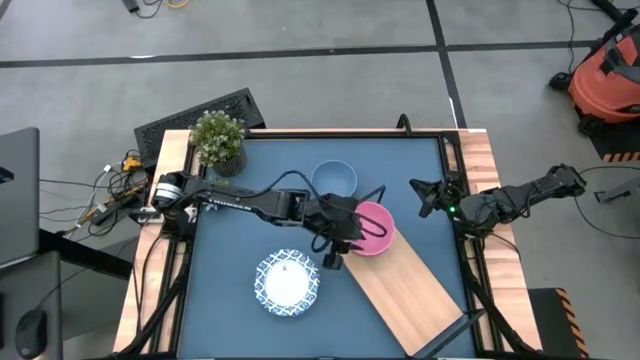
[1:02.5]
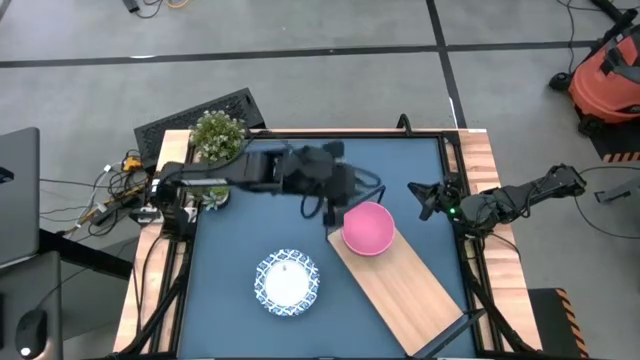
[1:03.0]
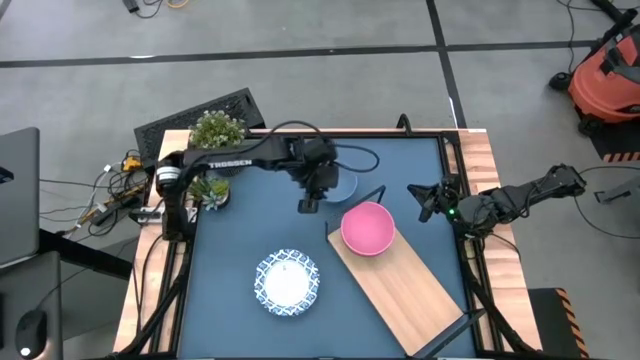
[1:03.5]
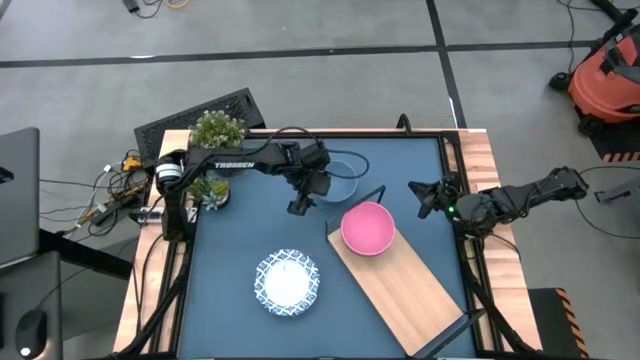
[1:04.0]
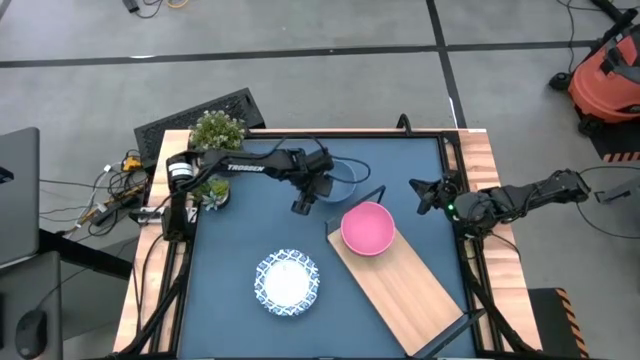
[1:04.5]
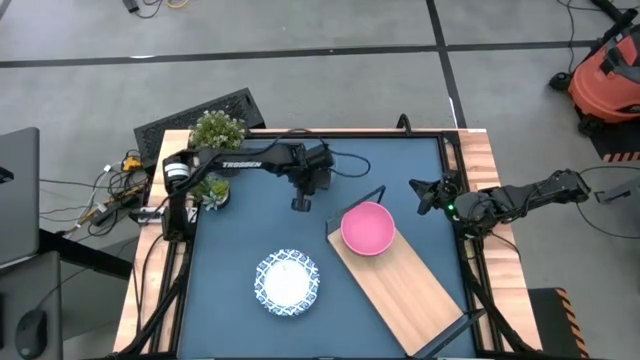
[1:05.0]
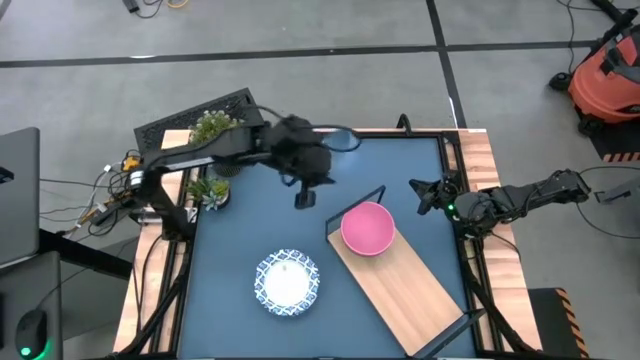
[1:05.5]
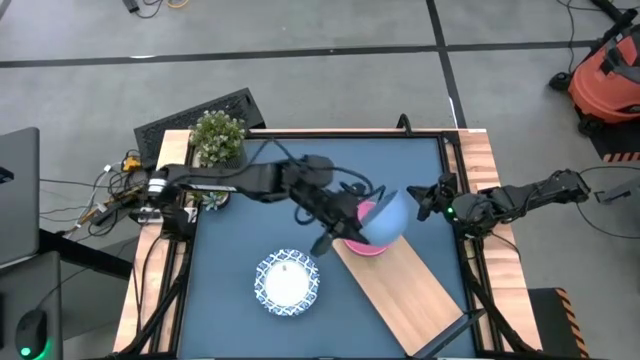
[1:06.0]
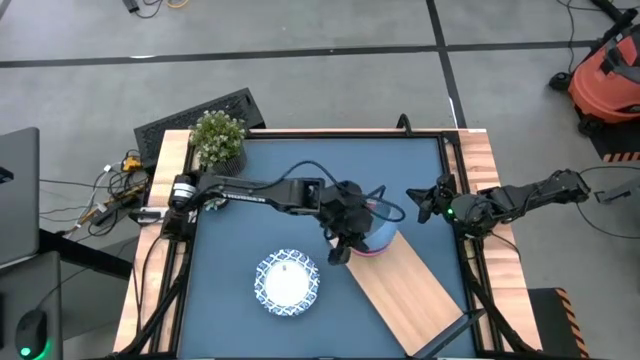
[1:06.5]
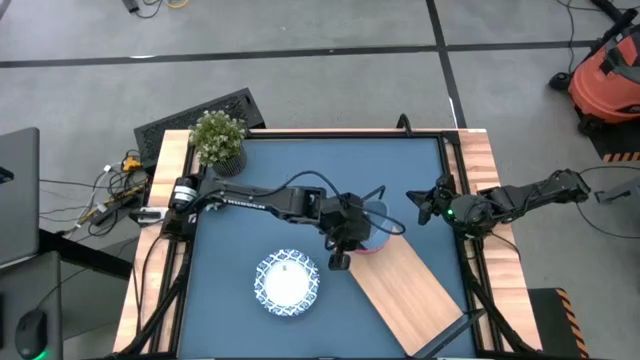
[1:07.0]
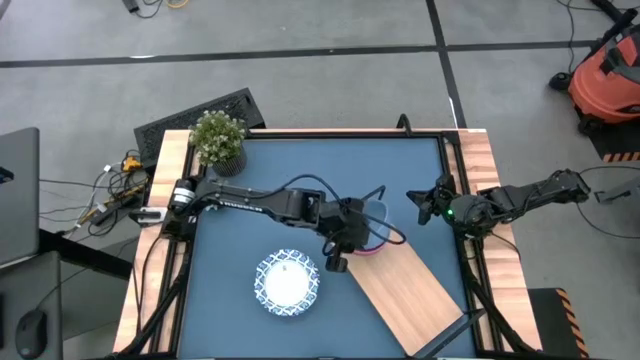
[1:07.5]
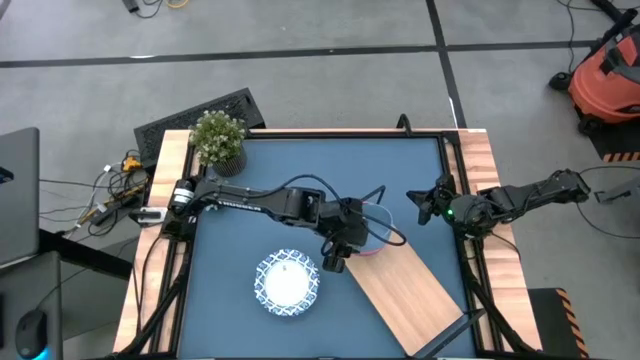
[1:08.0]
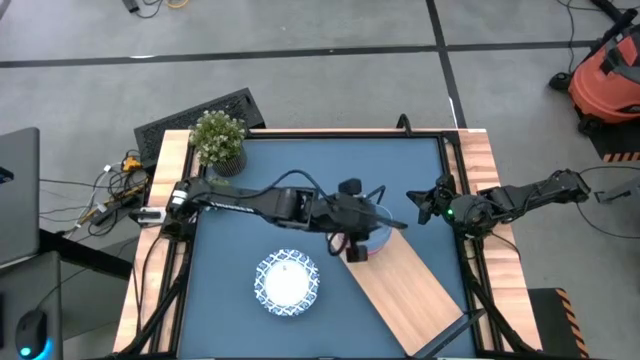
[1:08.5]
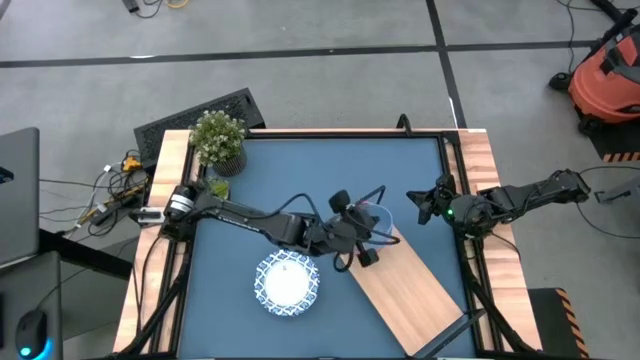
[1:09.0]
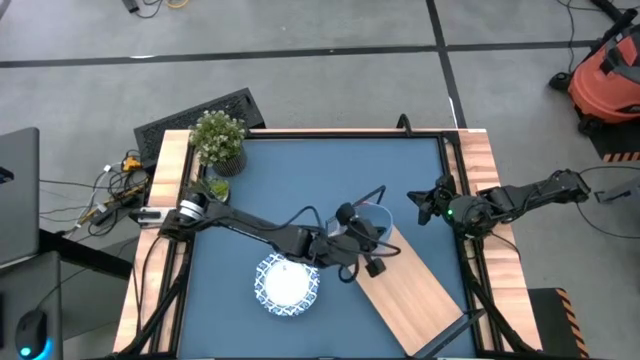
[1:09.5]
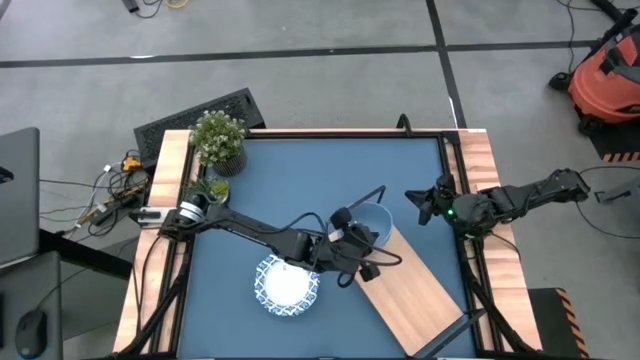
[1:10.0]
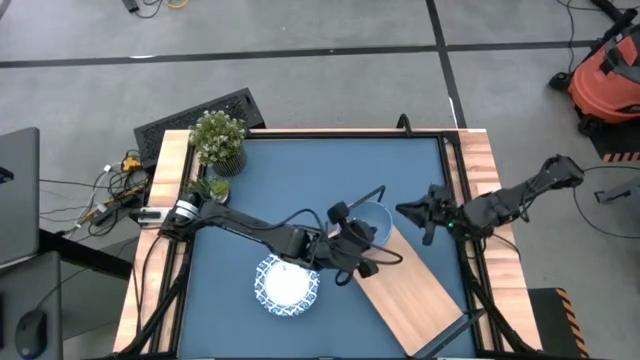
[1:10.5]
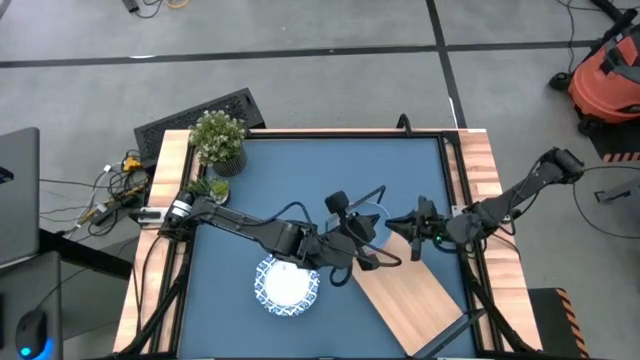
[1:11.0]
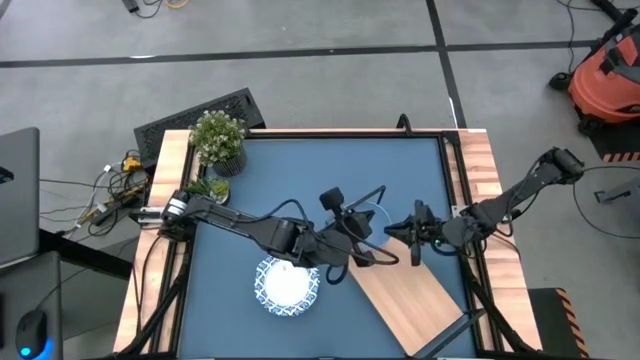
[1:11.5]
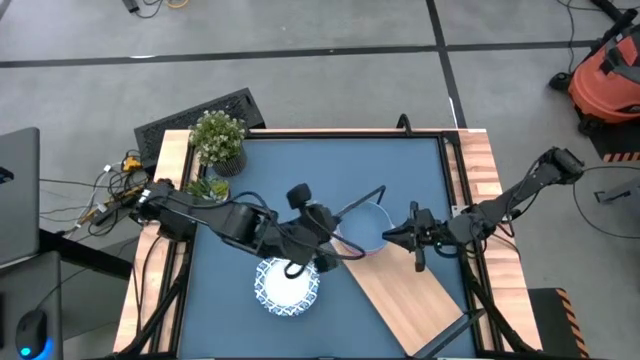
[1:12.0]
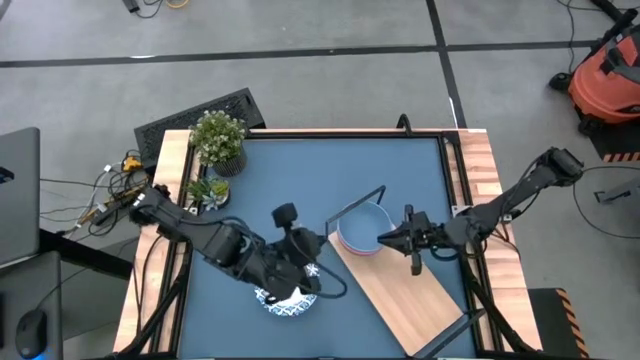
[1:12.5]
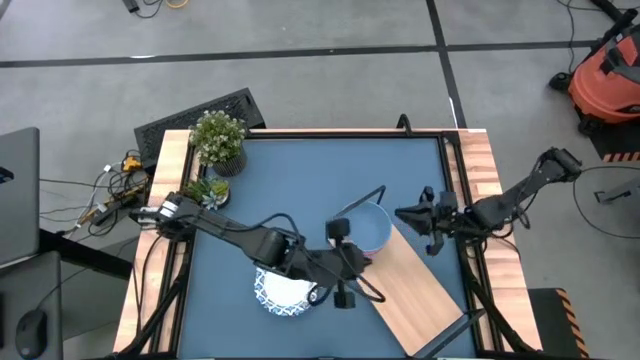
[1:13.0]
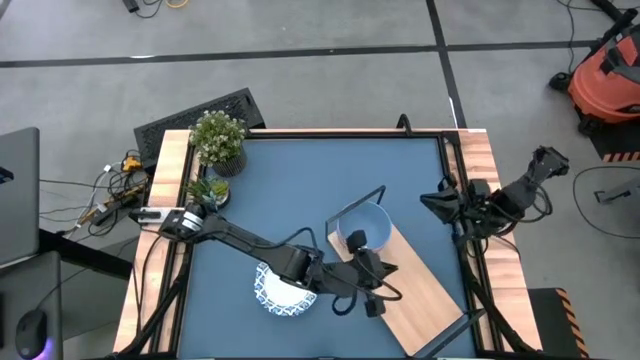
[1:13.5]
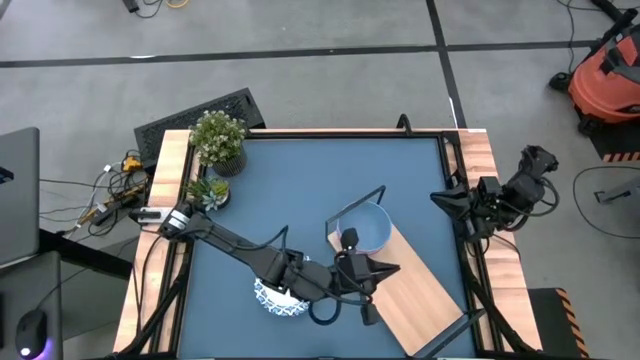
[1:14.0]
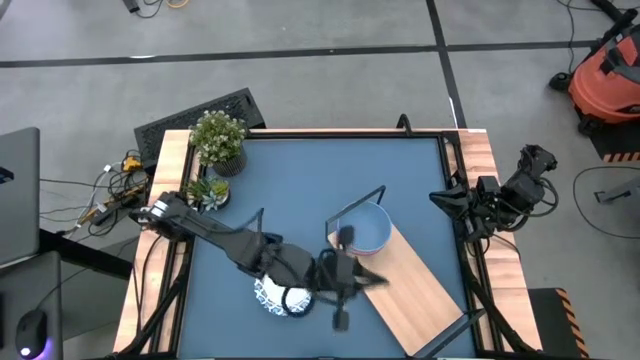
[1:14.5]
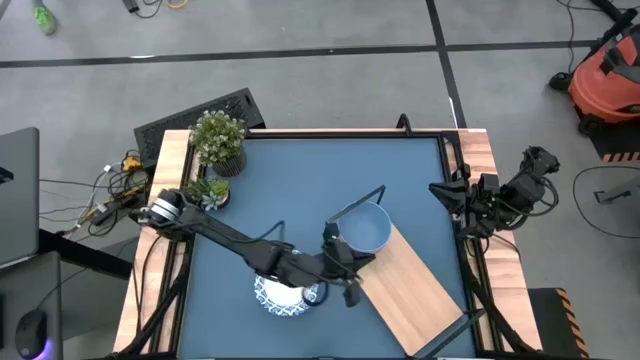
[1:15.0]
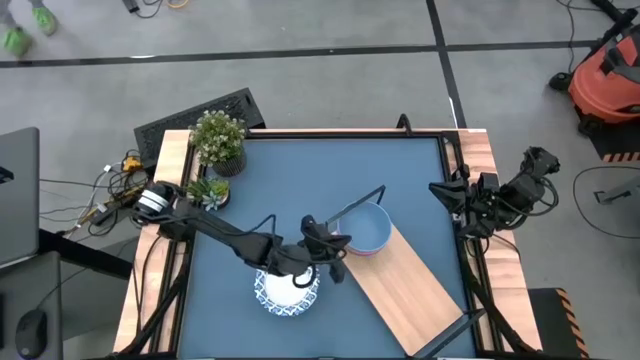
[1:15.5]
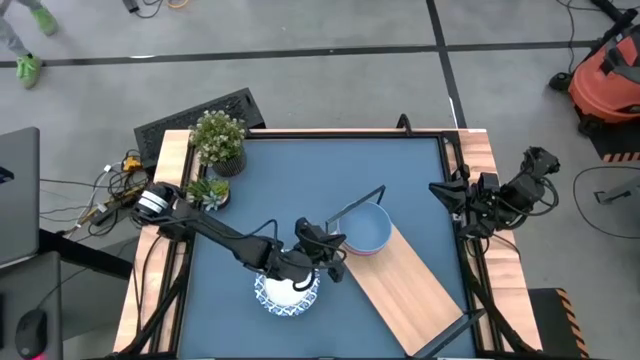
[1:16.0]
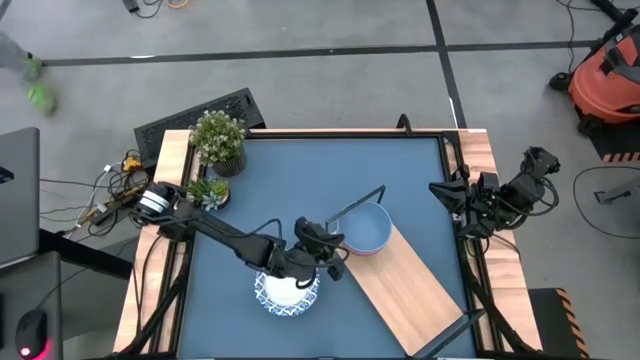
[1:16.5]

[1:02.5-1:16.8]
Task: Place and stack bowls onto a shelf
Stack the blue bowl on top of the pink bowl on the shelf

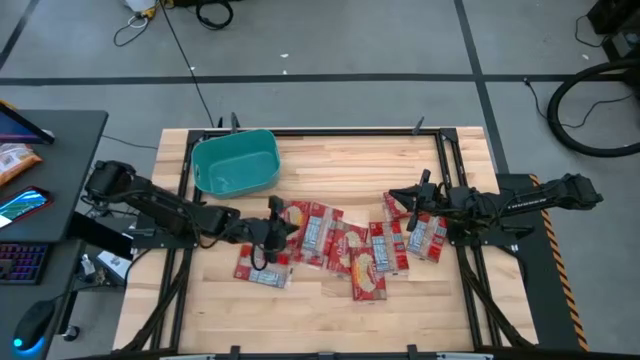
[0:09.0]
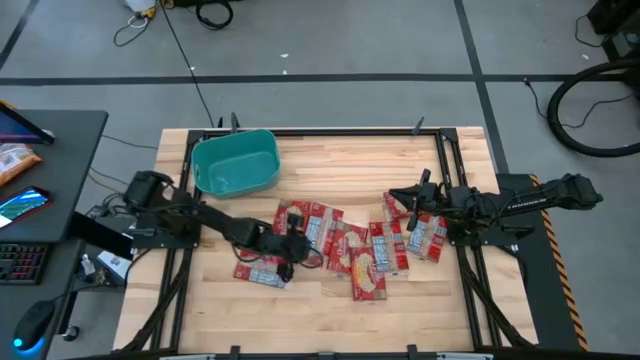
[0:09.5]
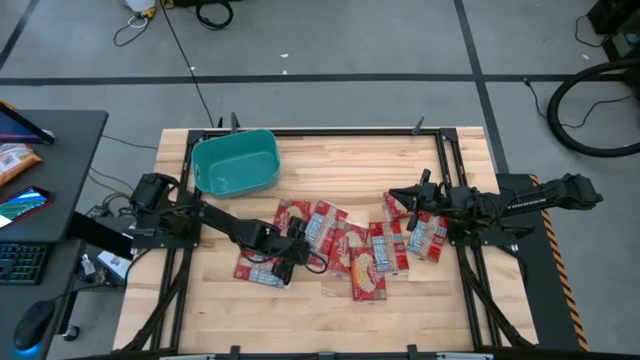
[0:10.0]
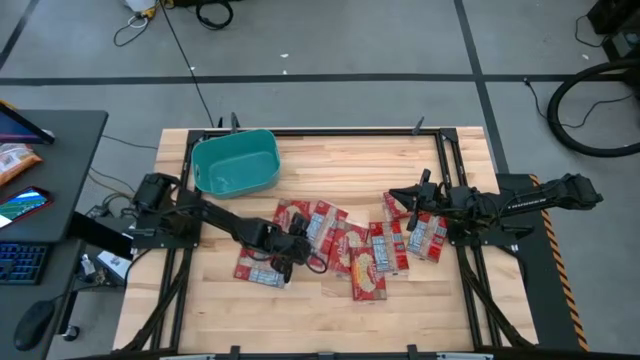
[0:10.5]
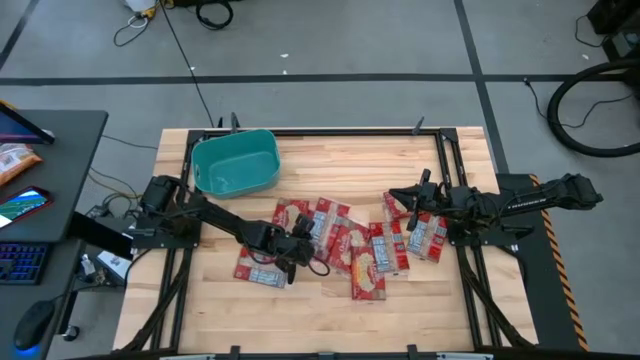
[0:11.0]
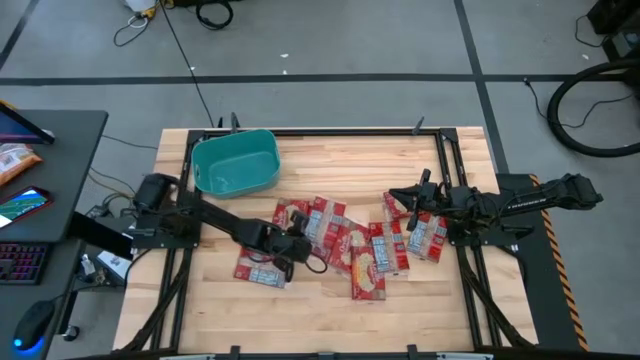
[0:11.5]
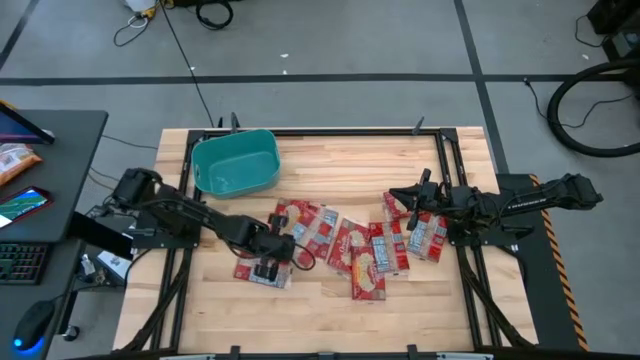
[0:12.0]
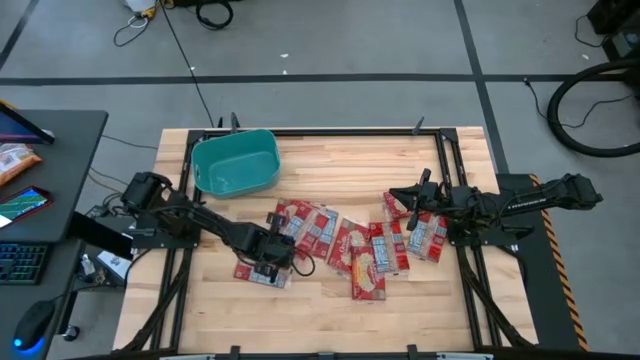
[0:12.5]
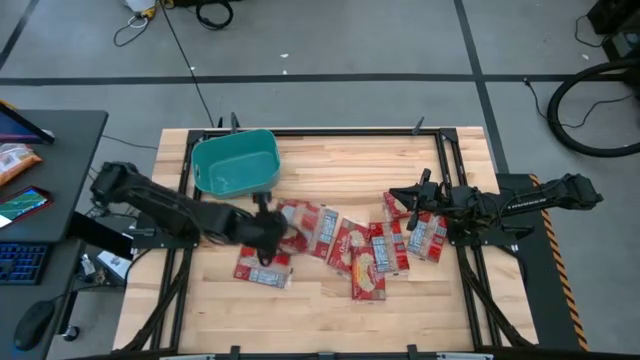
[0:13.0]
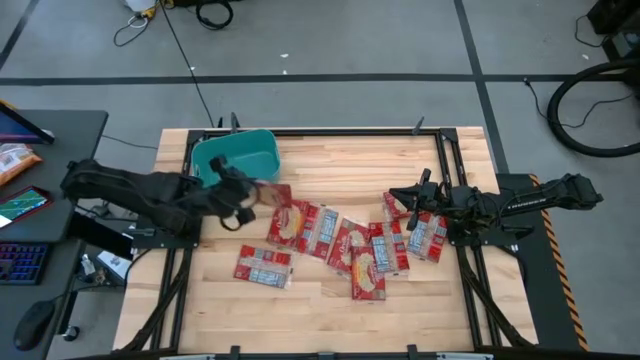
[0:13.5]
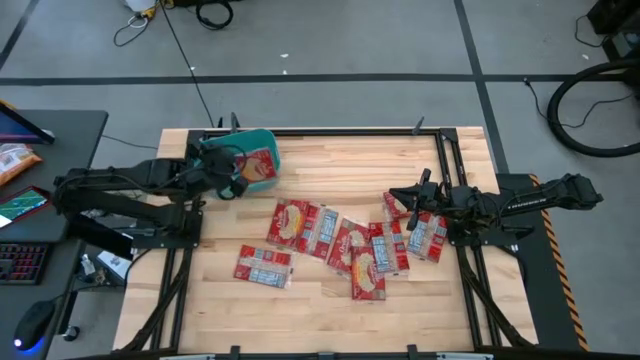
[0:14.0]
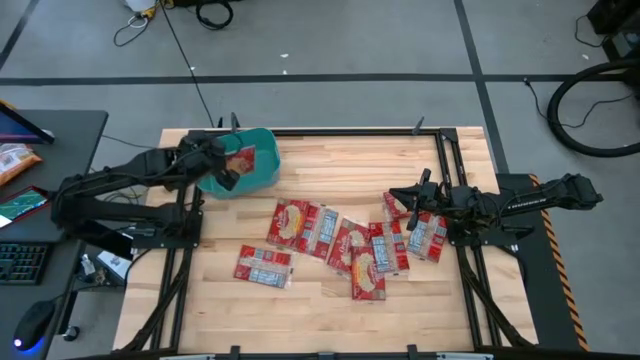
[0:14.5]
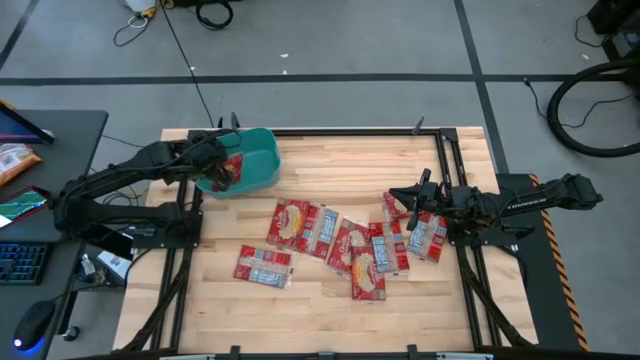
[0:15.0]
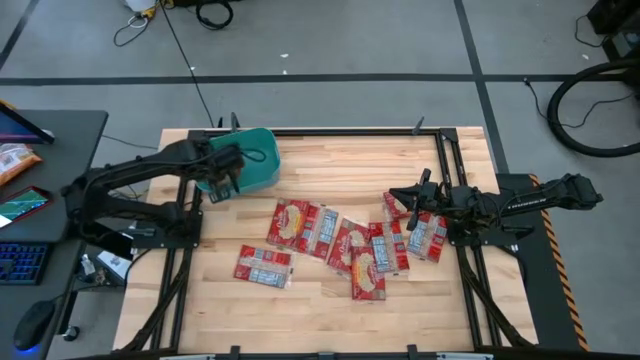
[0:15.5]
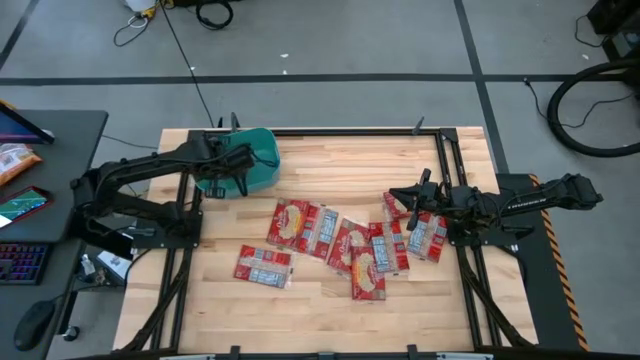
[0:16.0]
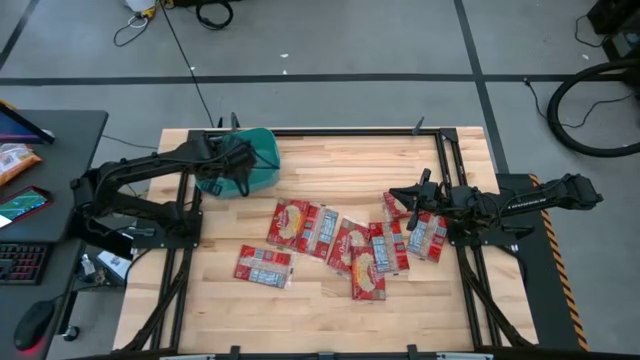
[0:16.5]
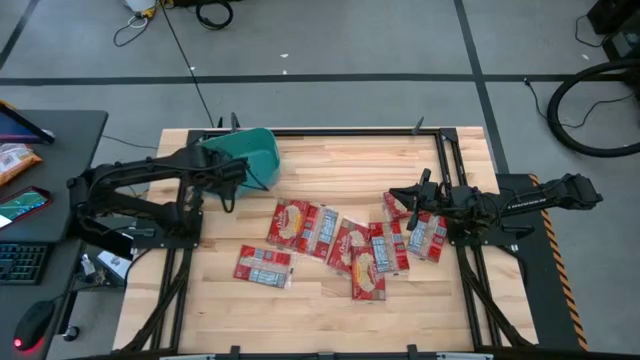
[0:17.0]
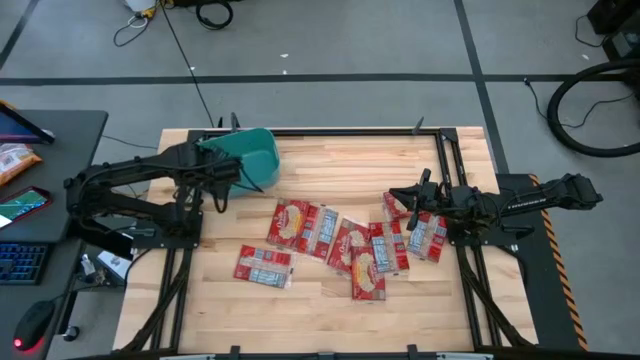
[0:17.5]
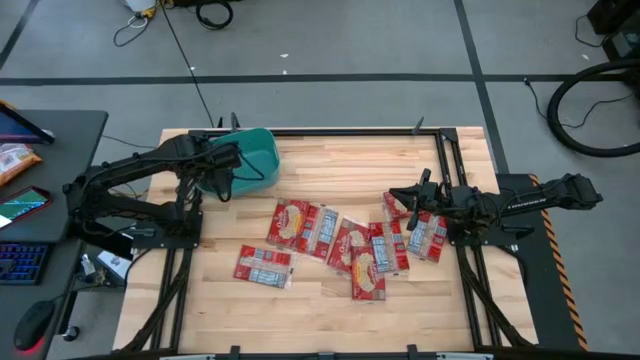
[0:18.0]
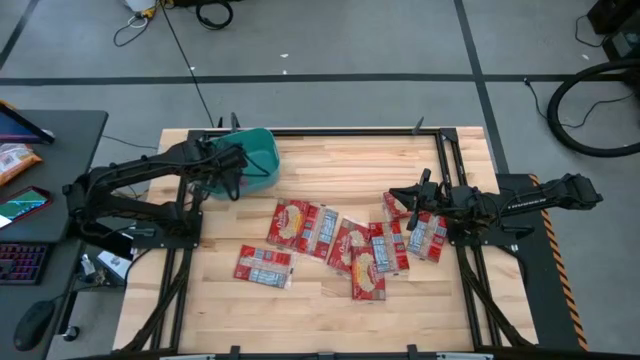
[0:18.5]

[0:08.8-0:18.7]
Task: Sort popcorn bags into baskets
Put the red popcorn bag into the green bin
